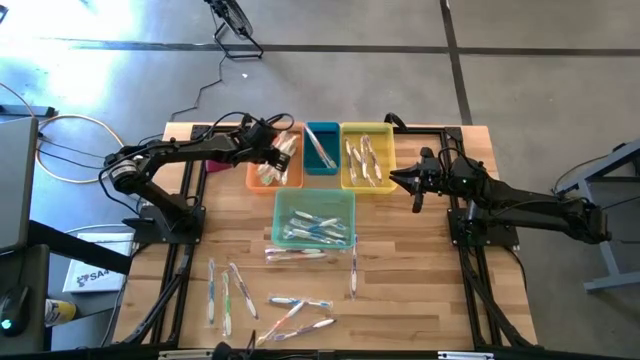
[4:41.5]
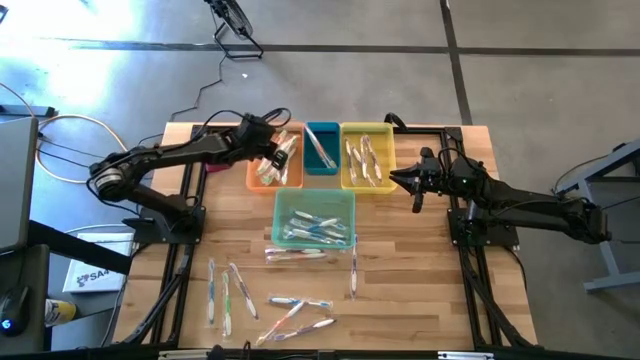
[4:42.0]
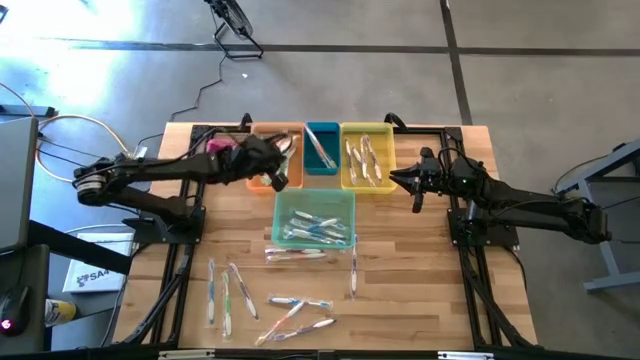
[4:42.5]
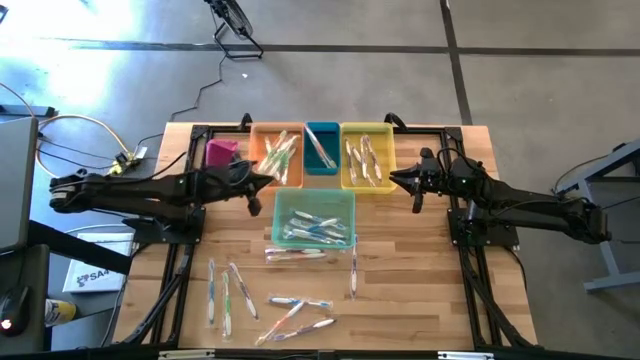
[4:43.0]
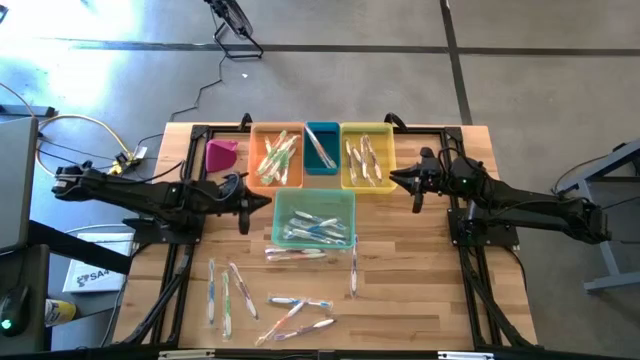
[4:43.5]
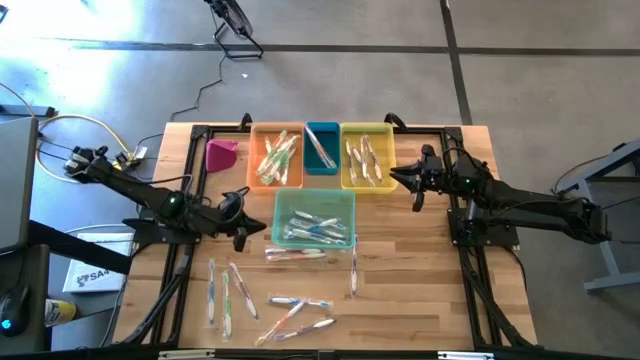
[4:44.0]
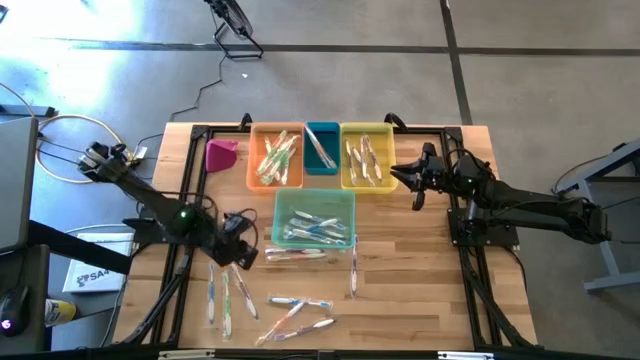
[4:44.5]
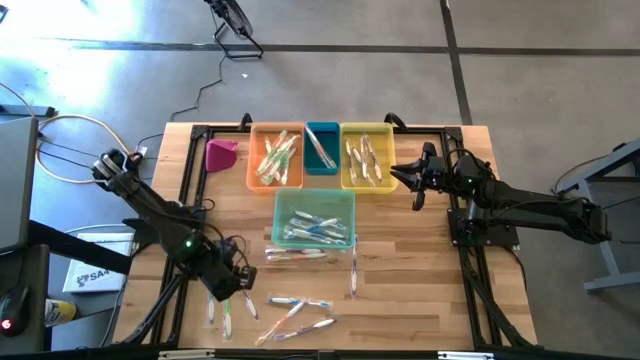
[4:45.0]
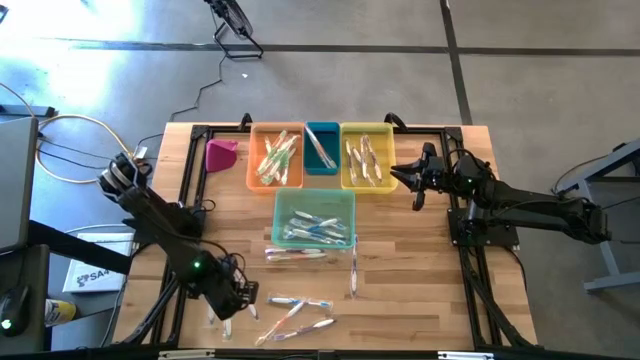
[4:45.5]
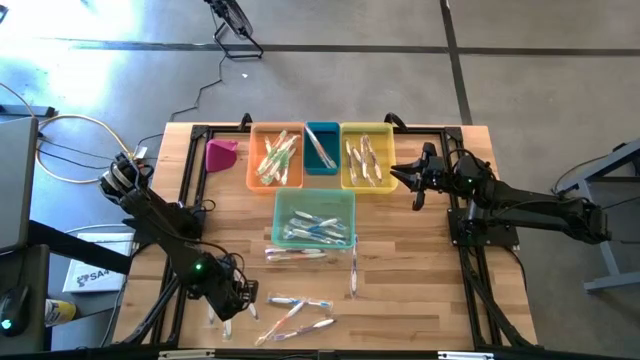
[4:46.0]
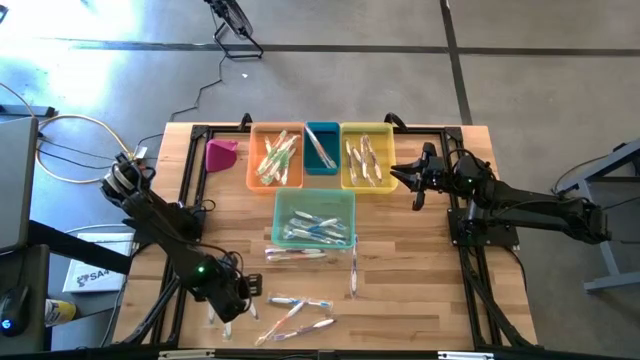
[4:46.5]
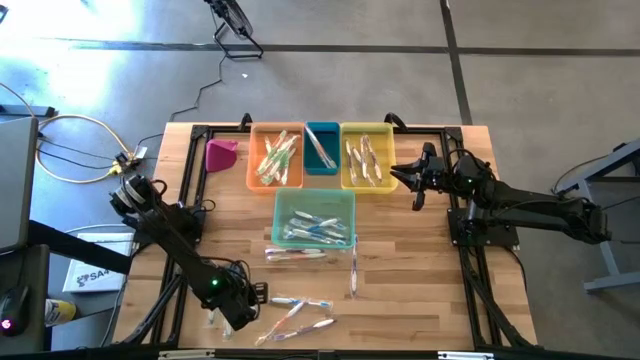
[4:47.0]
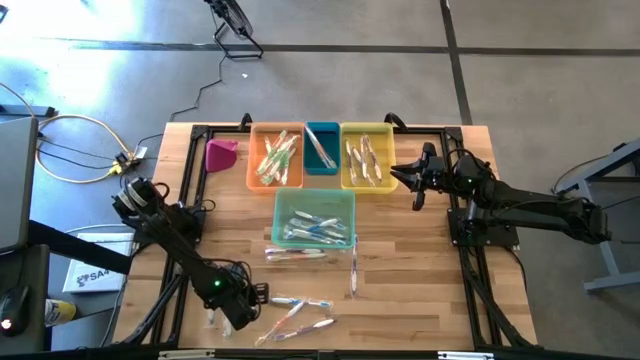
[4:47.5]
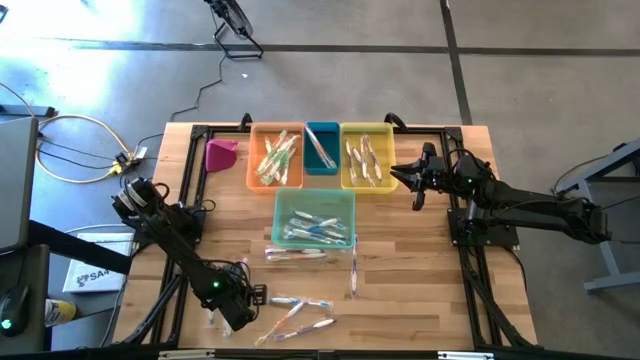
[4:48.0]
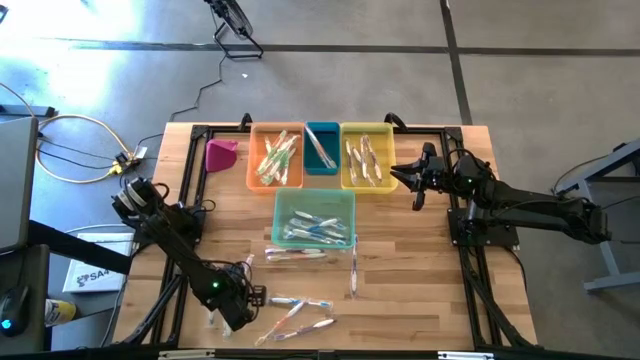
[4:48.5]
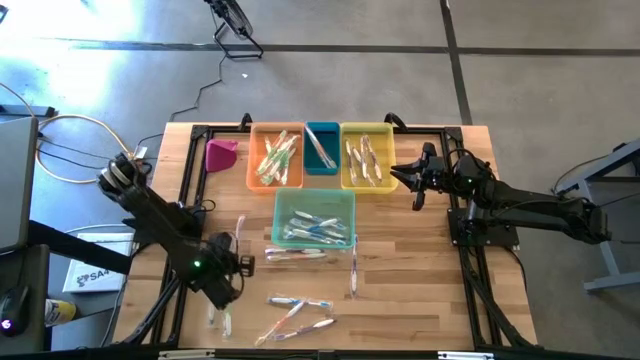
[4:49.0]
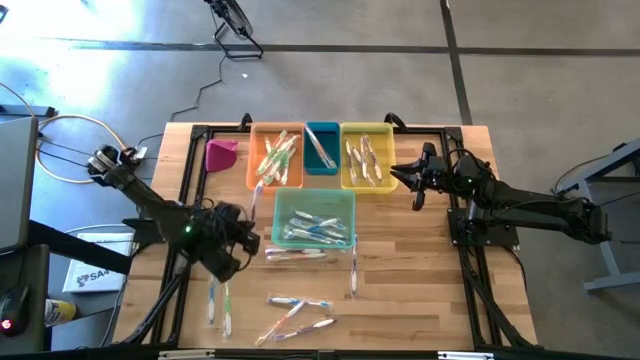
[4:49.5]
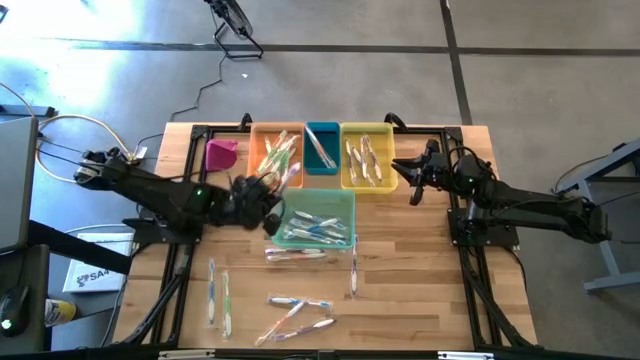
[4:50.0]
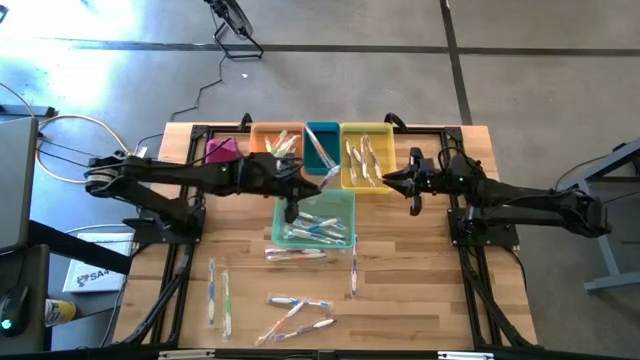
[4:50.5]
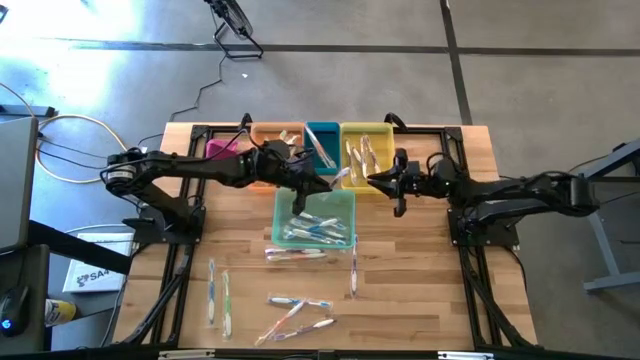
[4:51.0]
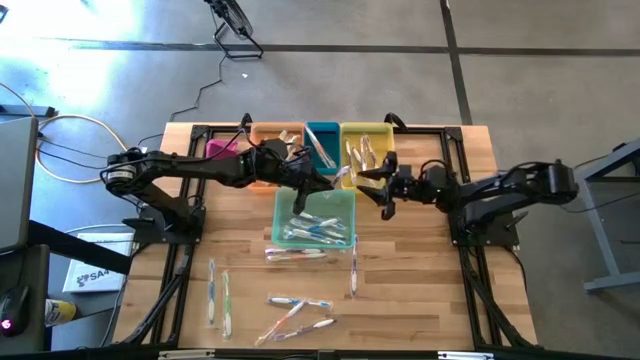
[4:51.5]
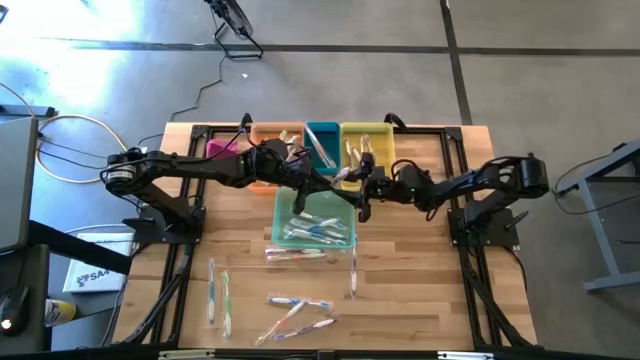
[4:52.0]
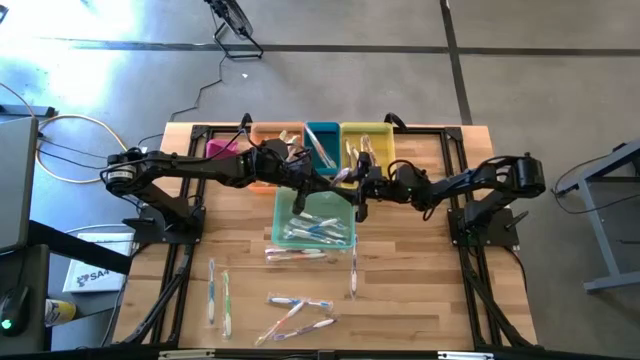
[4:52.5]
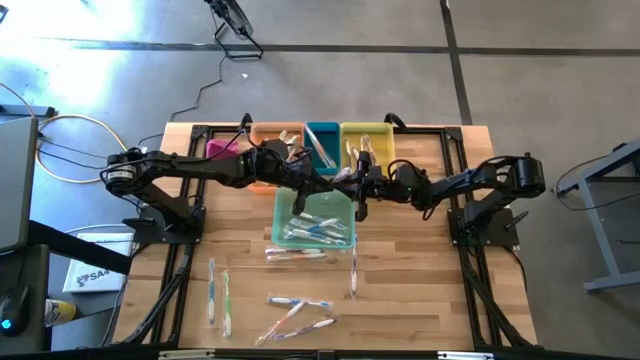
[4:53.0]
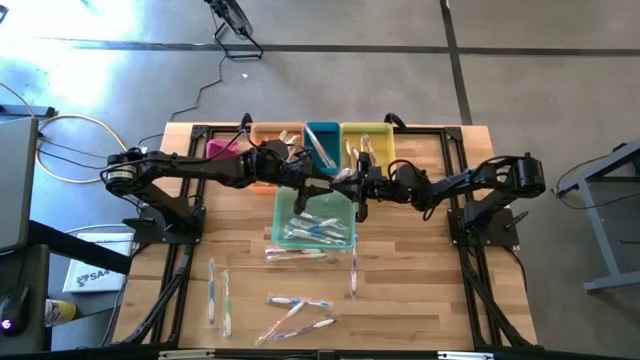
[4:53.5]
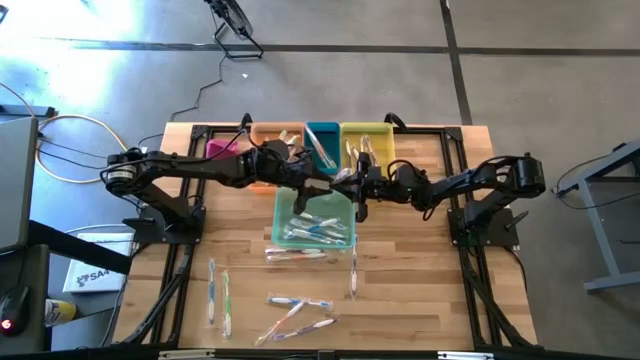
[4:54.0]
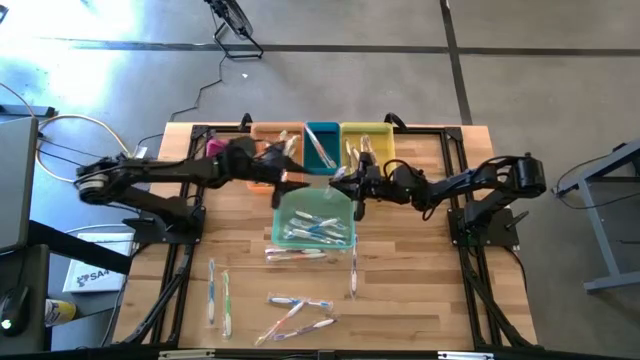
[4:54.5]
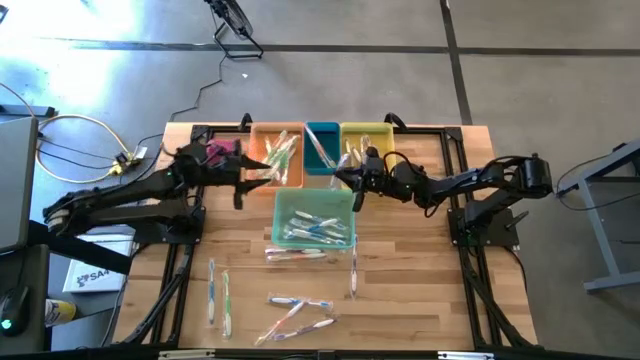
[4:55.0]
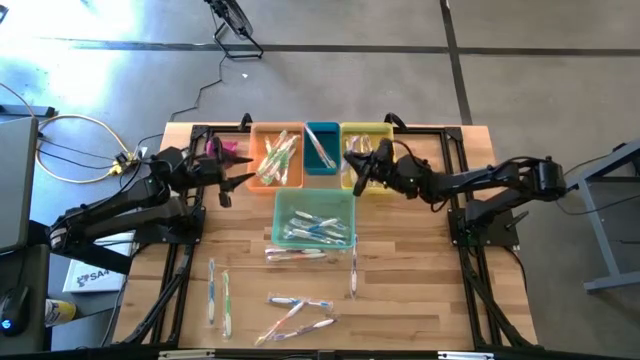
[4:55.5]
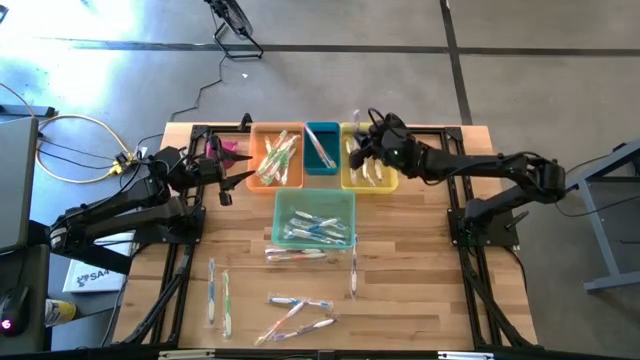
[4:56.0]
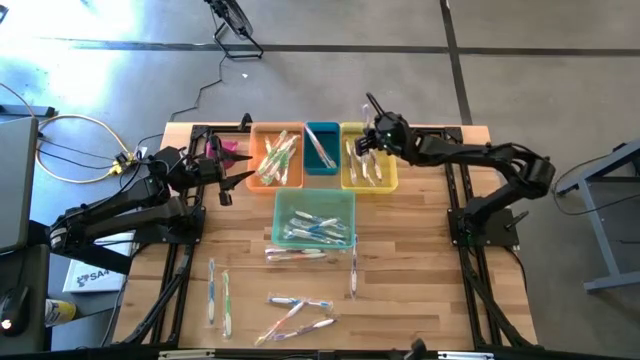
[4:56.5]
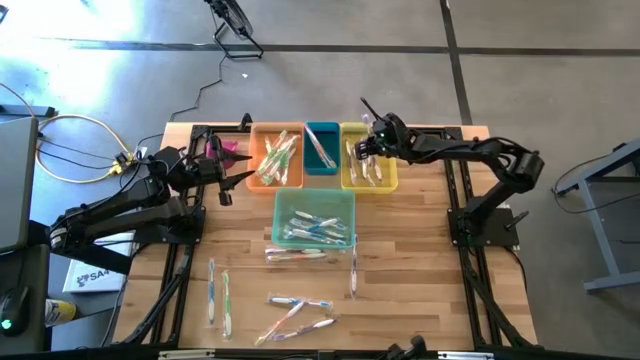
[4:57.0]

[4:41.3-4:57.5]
Task: Pick & Place Toothbrushes
Put the purple toothbrush into the yellow bin
